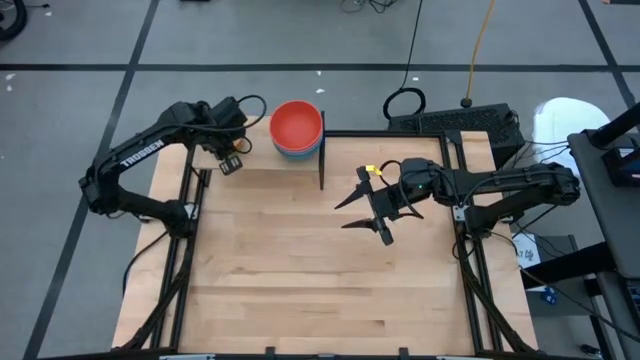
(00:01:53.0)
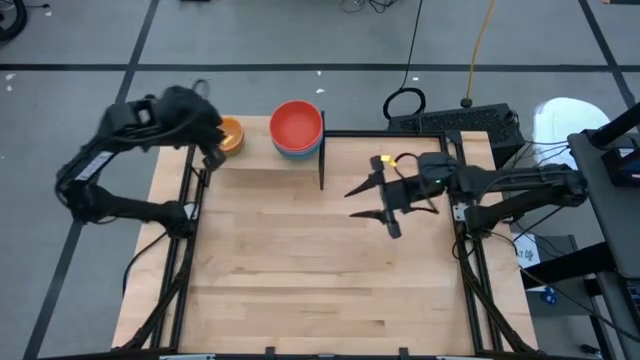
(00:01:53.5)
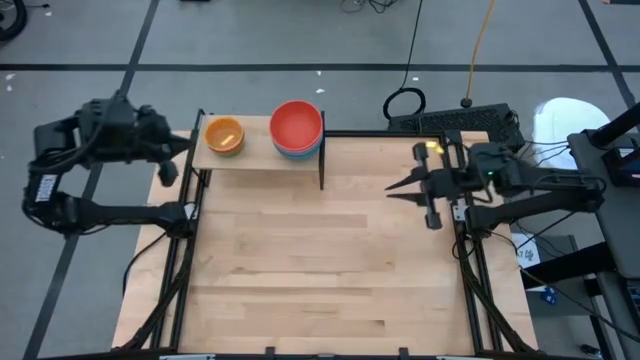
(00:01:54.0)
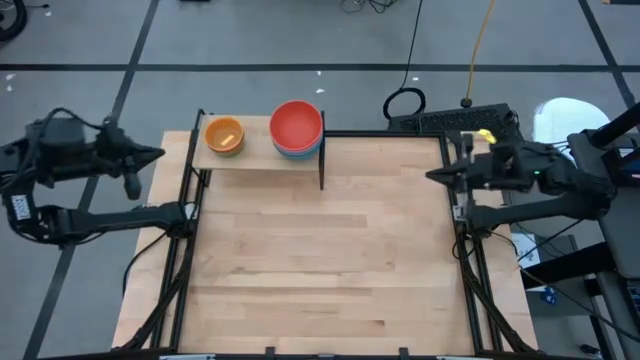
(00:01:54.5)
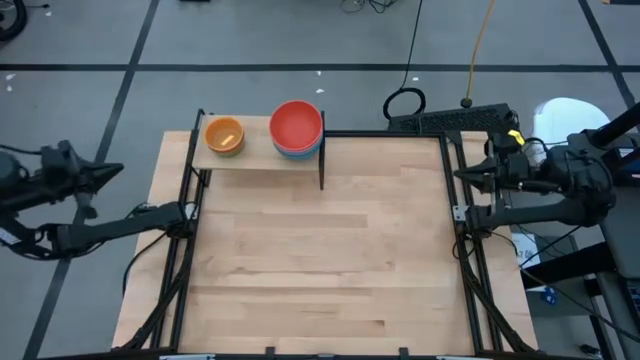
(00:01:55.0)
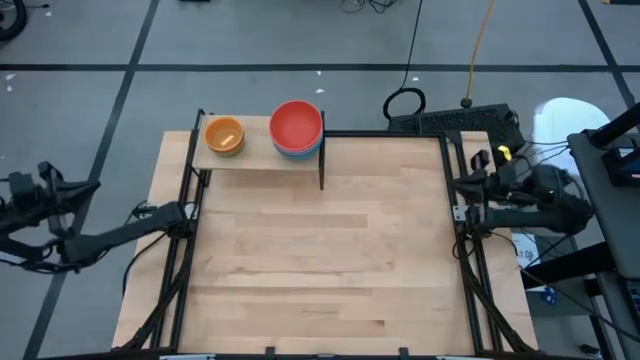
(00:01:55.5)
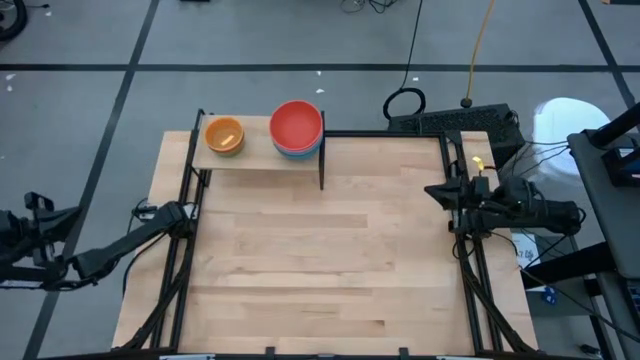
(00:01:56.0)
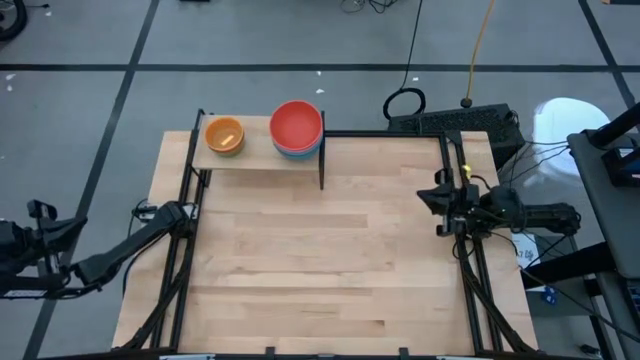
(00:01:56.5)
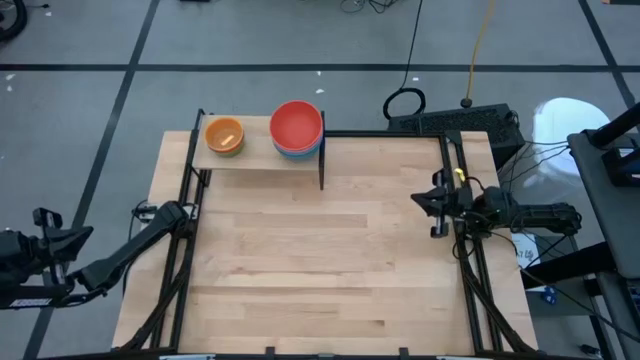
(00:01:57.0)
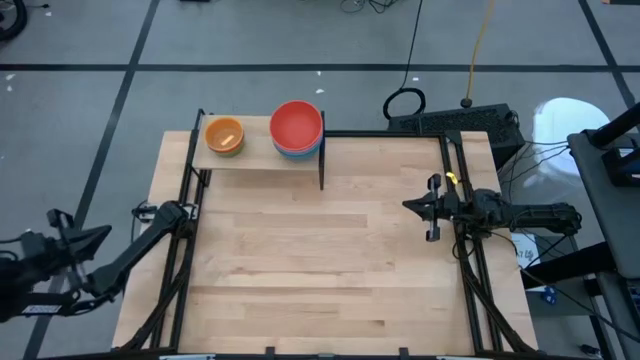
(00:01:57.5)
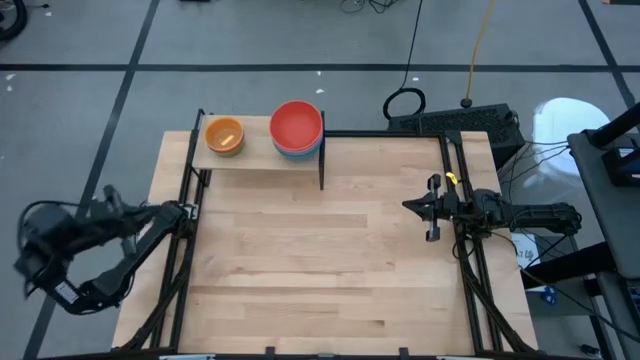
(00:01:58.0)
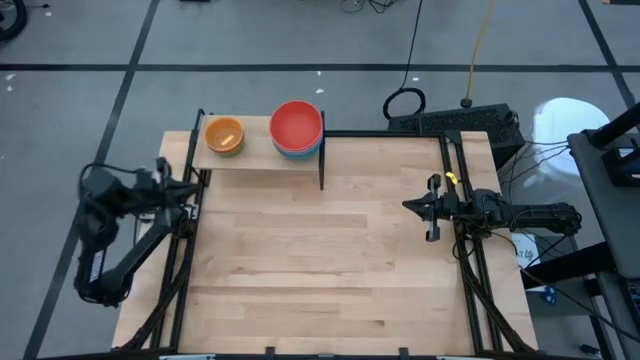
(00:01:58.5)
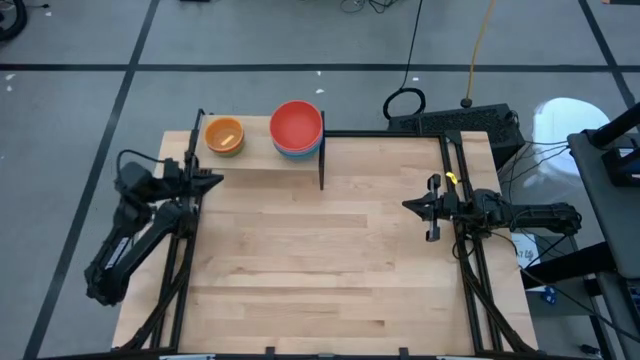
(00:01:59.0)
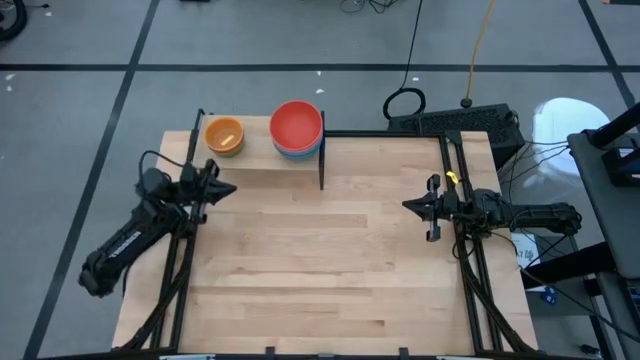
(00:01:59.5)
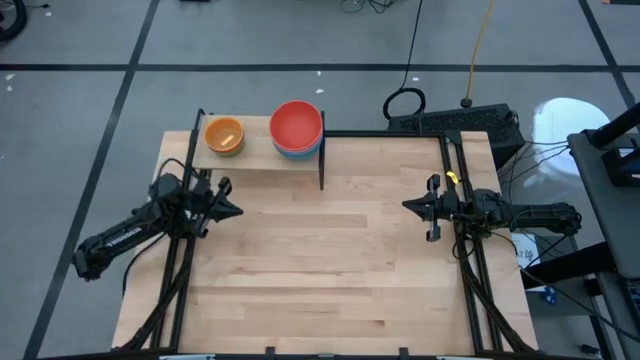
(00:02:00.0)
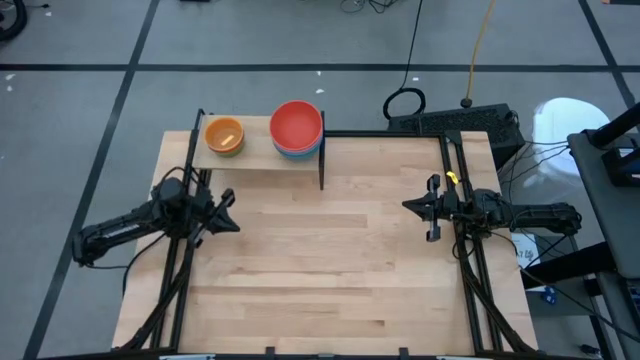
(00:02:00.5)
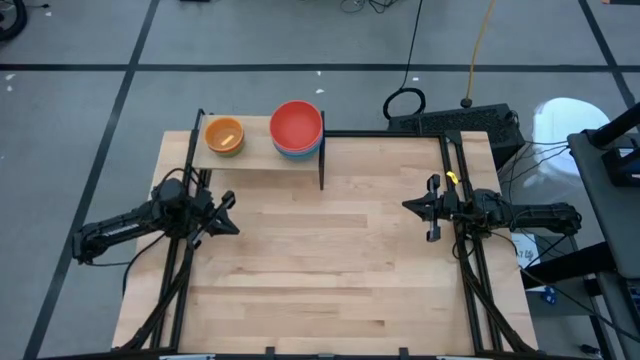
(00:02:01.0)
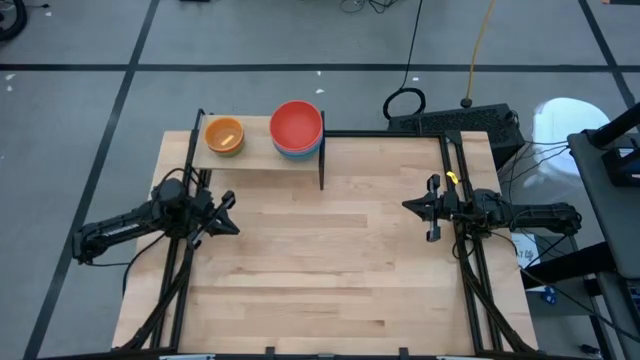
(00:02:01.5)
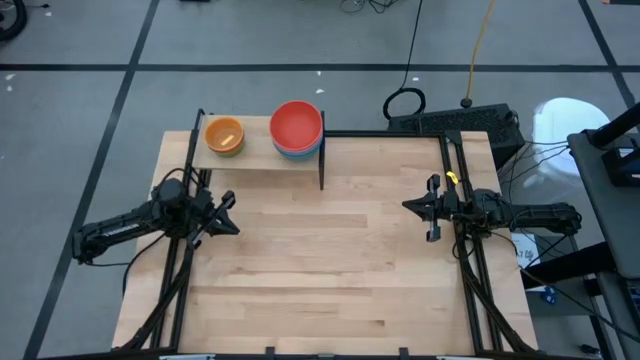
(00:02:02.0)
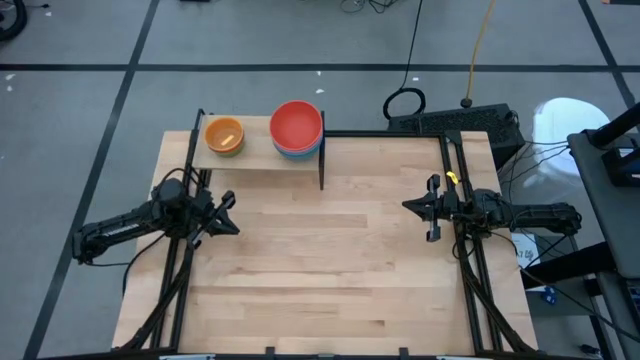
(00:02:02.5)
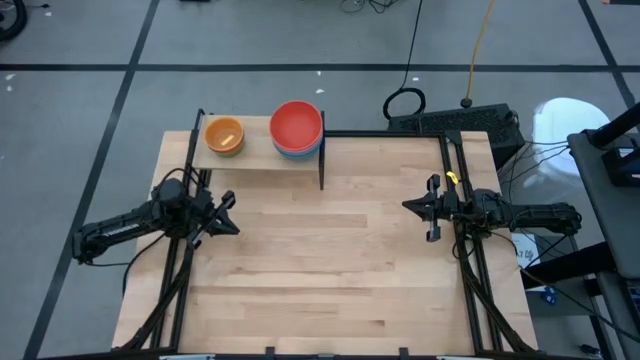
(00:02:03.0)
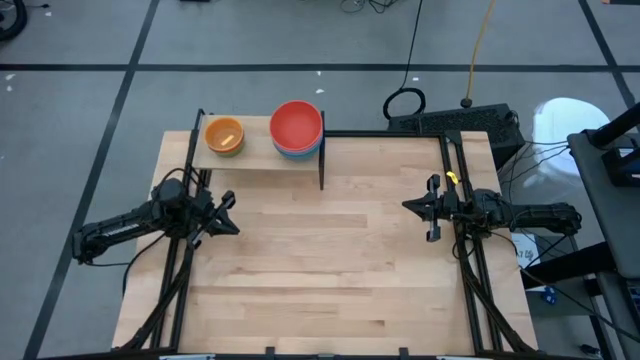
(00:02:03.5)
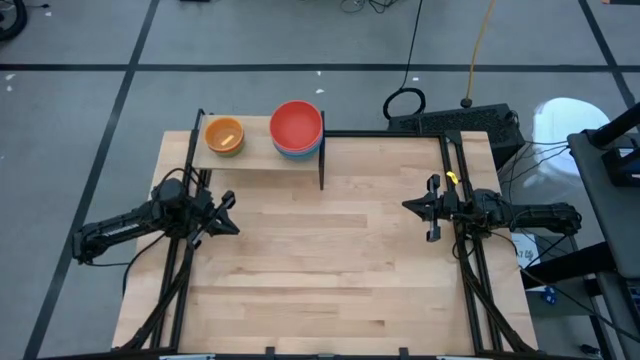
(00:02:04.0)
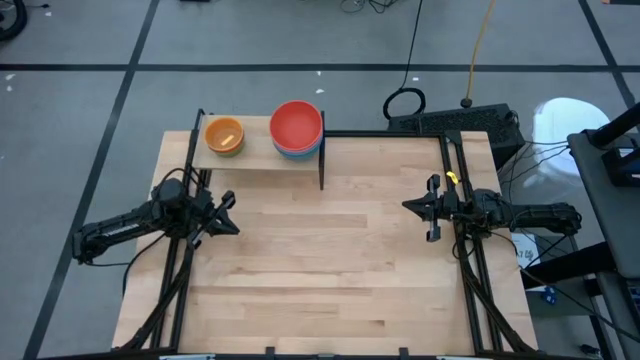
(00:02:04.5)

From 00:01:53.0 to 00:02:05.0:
Task: Place and stack bowls onto a shelf
Return to Home Position

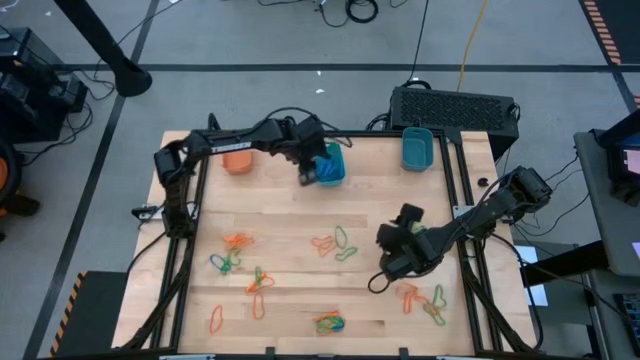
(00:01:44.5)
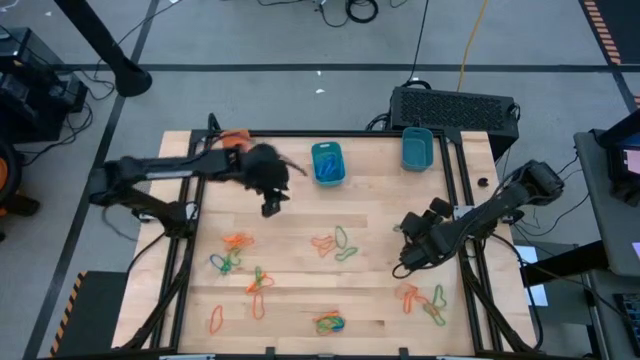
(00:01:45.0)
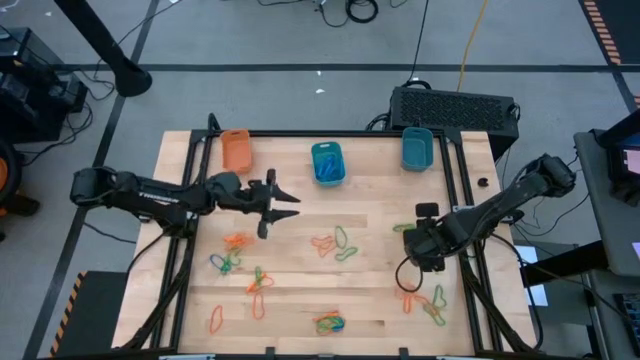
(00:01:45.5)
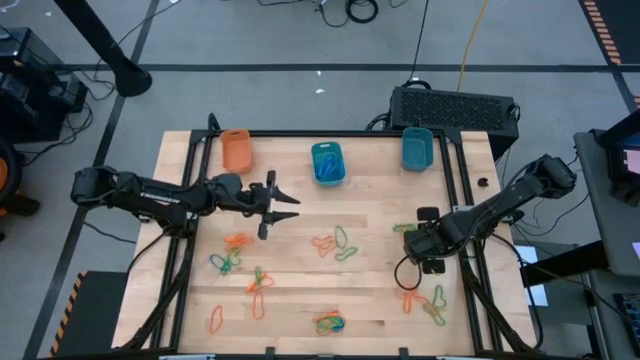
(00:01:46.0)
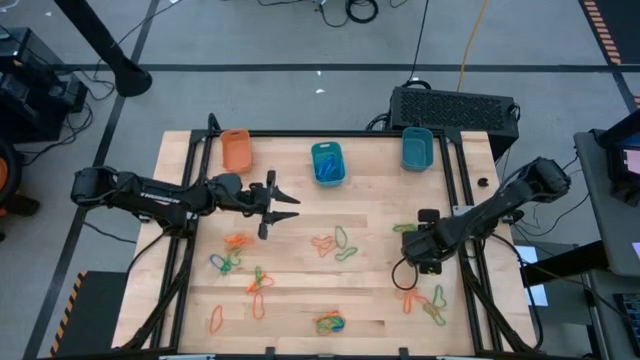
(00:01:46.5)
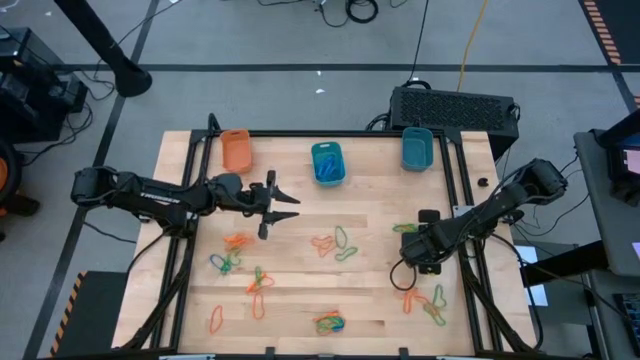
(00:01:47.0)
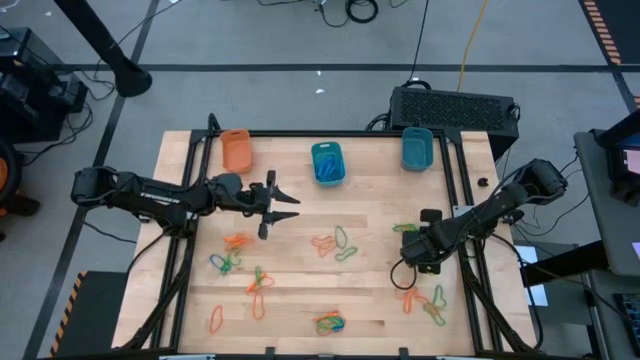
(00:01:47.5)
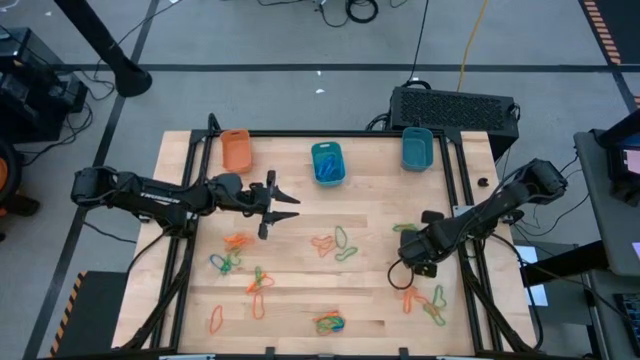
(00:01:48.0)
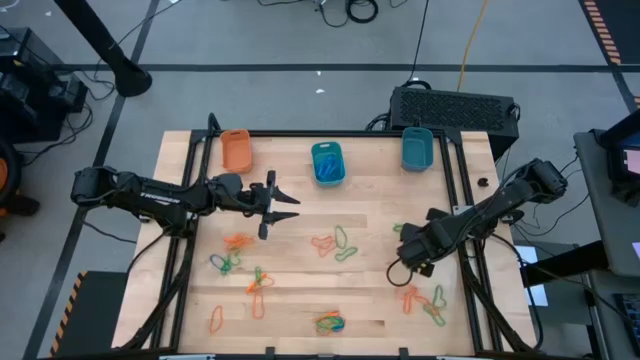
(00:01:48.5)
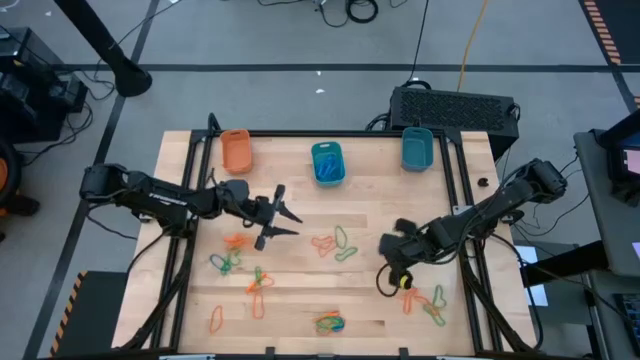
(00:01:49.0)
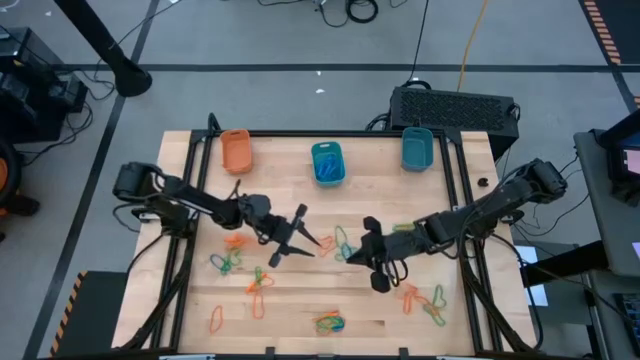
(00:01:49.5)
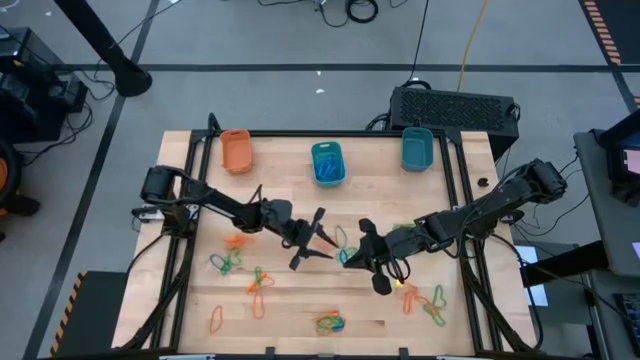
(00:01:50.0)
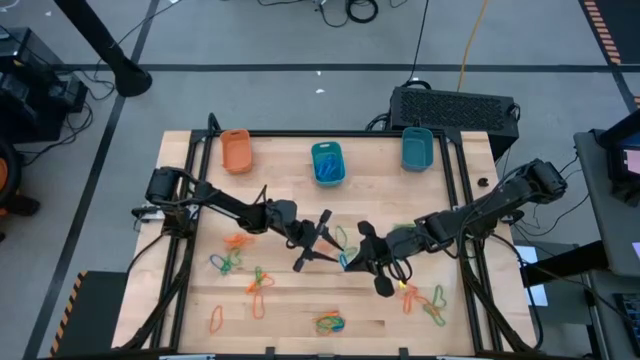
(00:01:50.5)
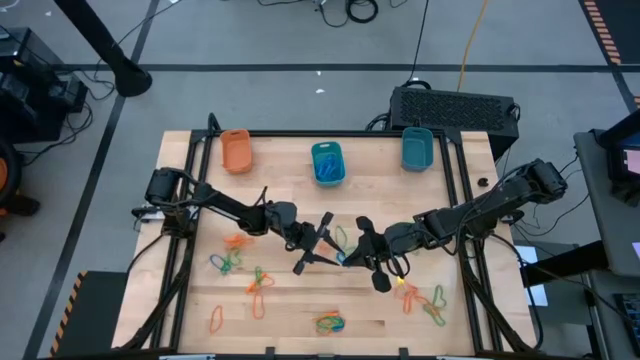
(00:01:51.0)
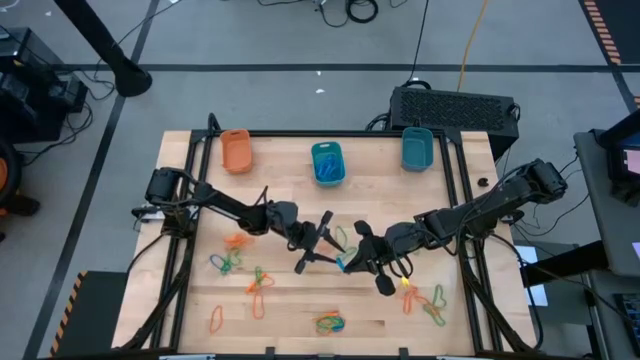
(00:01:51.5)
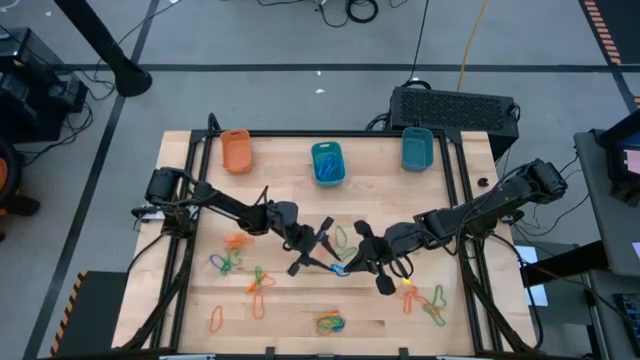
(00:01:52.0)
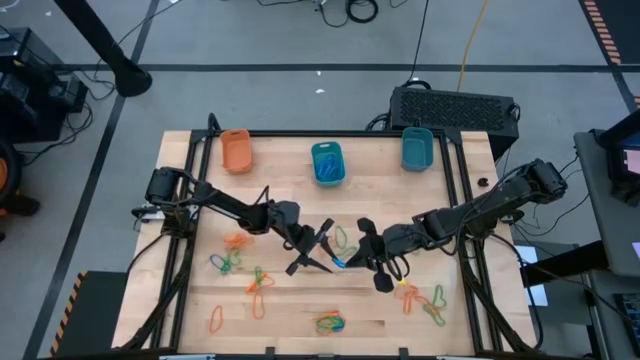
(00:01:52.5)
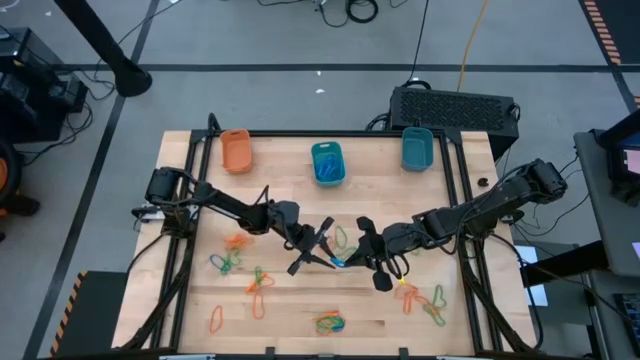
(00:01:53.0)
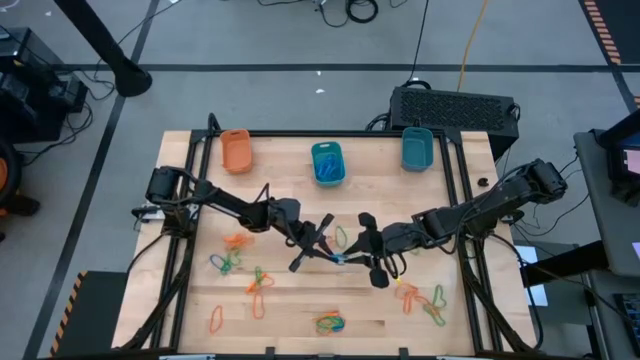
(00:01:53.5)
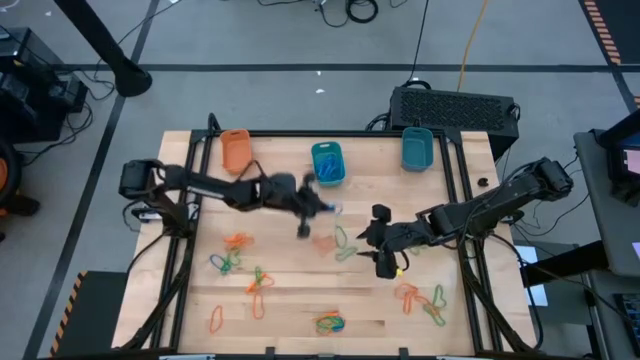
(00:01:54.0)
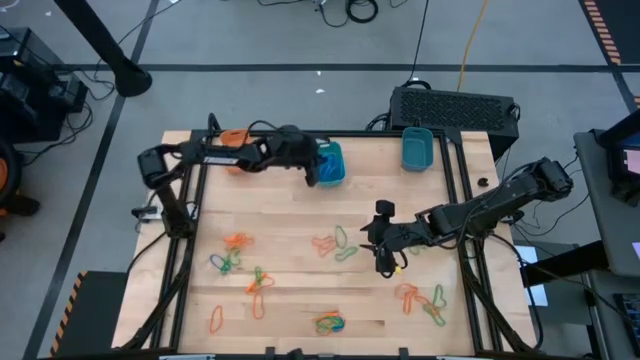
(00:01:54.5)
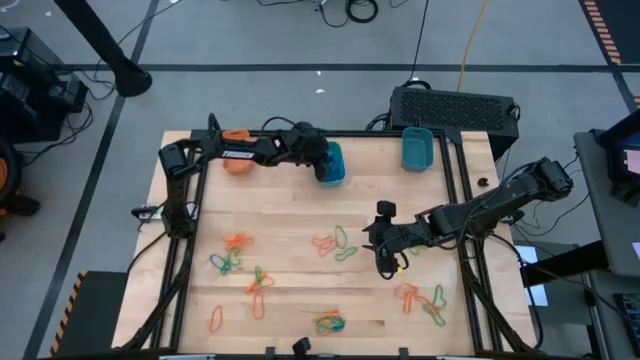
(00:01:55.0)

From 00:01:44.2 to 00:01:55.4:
Task: Sort rubber bands into baskets
Put the blue rubber band into the light blue bin
